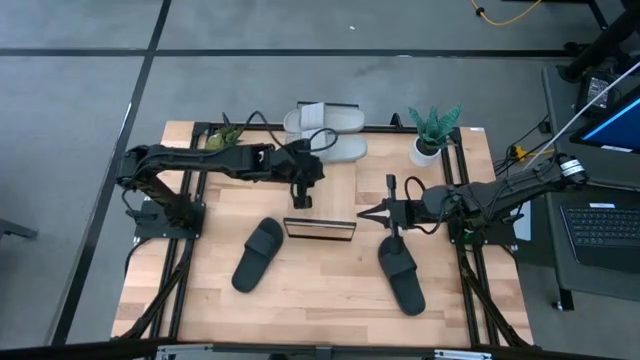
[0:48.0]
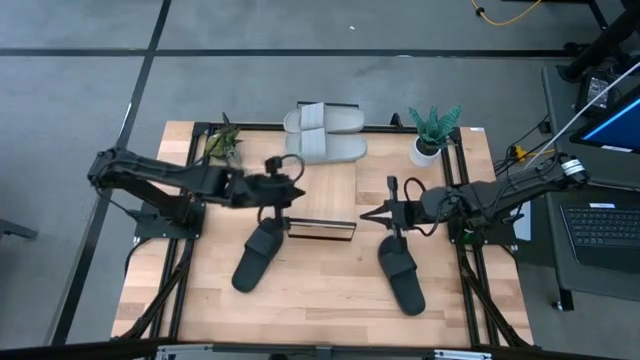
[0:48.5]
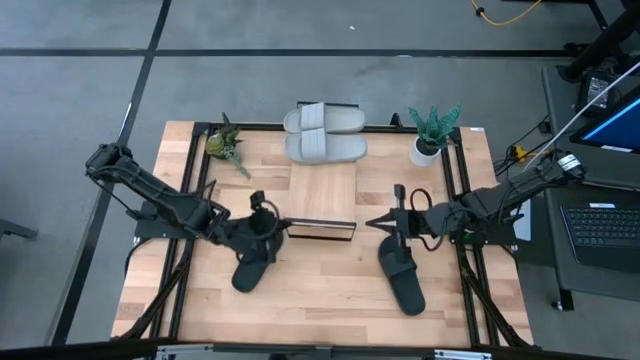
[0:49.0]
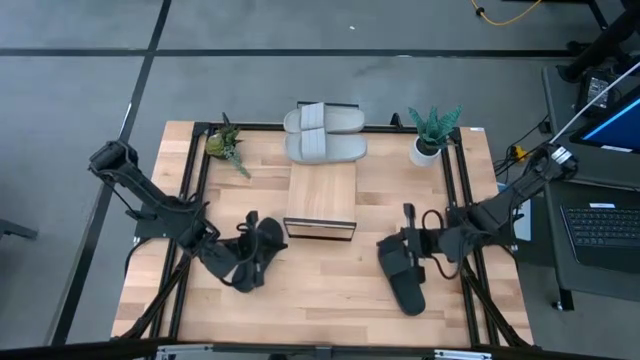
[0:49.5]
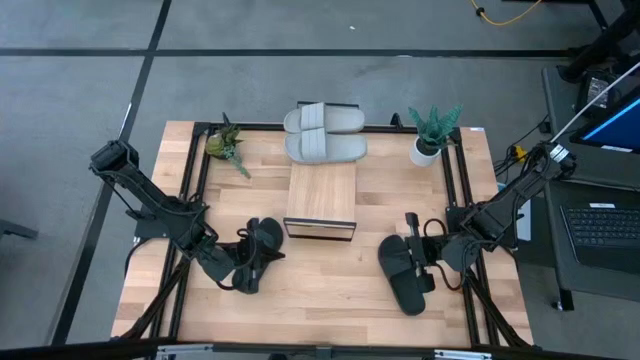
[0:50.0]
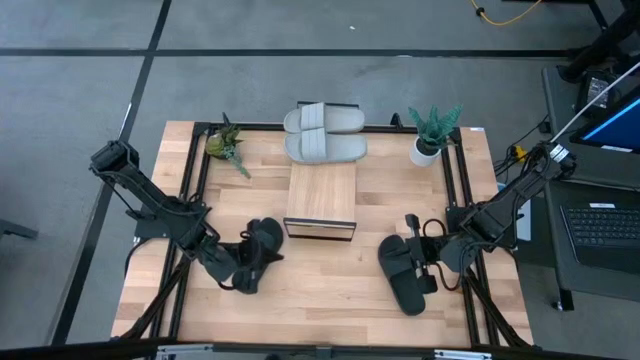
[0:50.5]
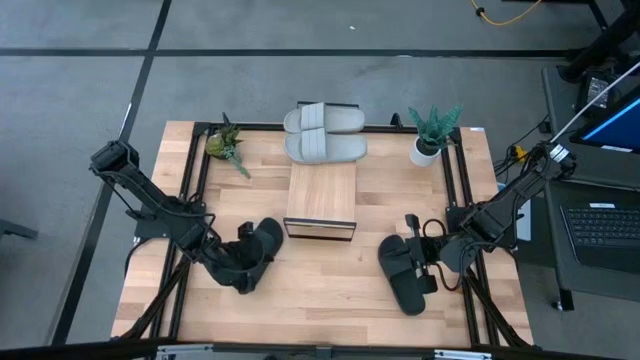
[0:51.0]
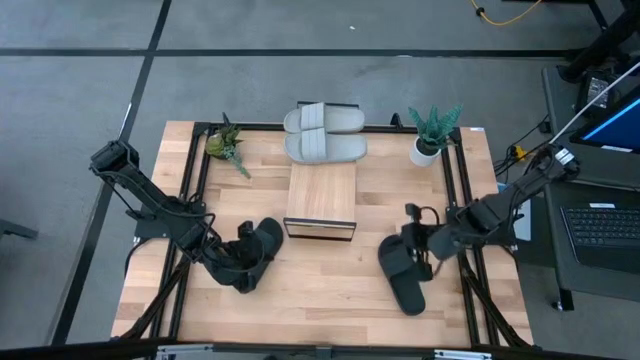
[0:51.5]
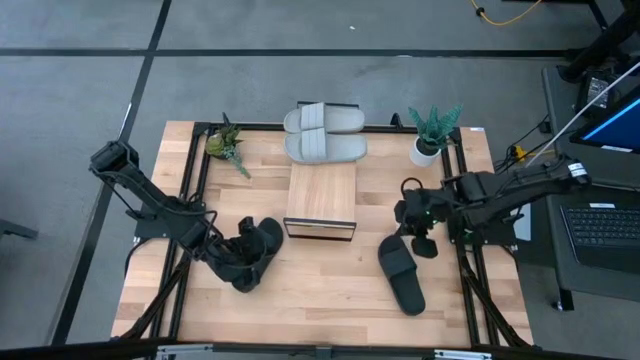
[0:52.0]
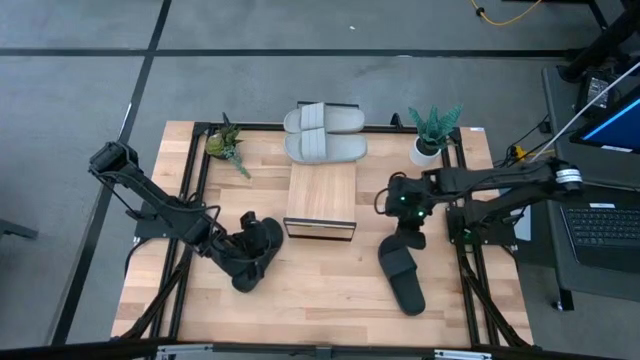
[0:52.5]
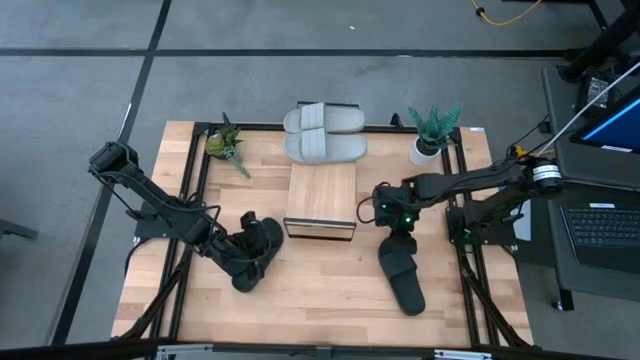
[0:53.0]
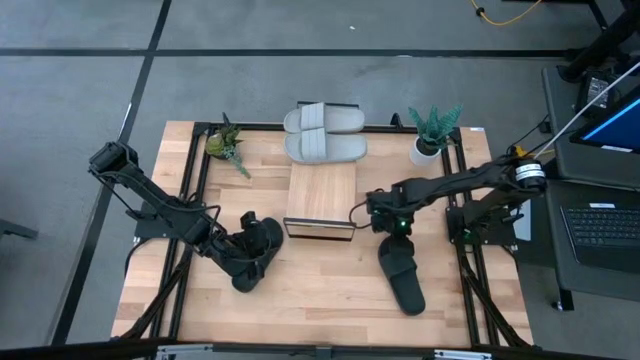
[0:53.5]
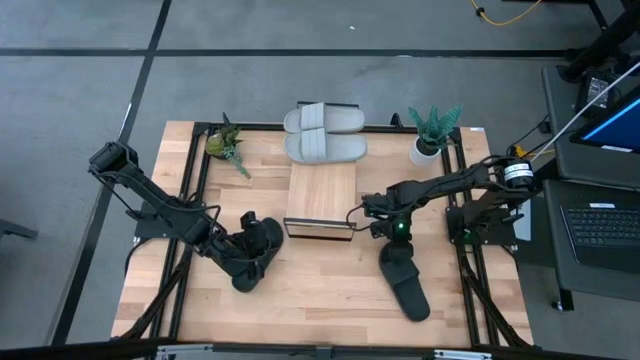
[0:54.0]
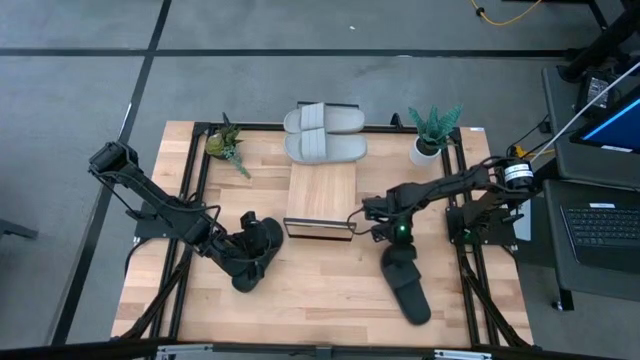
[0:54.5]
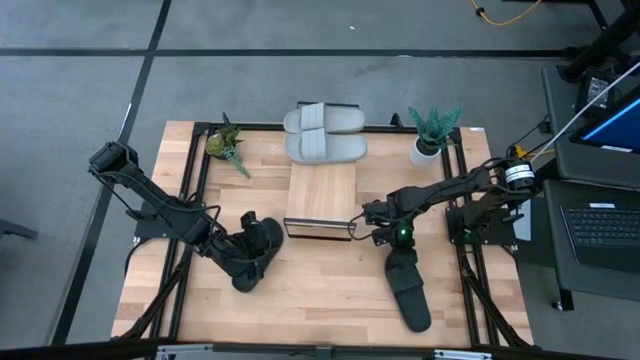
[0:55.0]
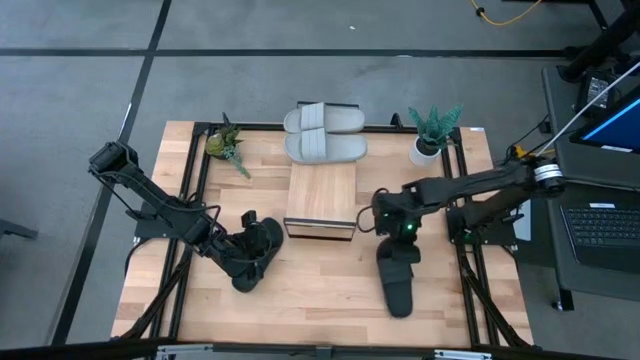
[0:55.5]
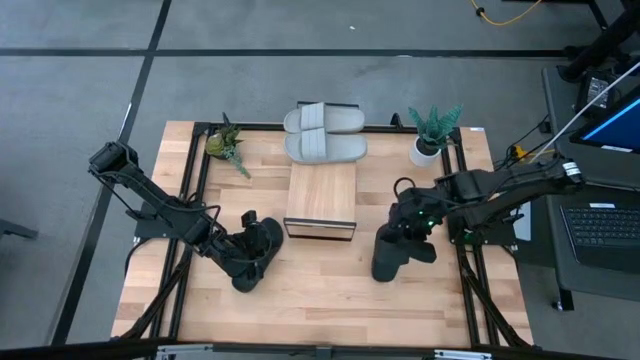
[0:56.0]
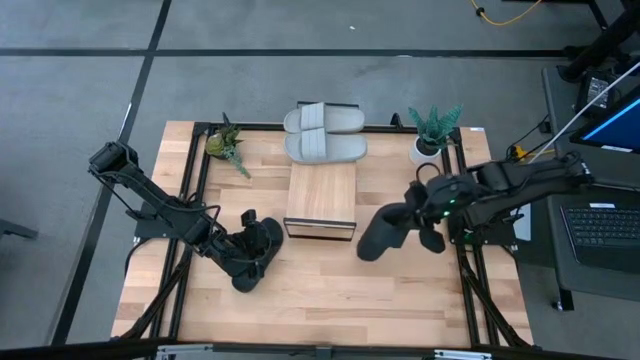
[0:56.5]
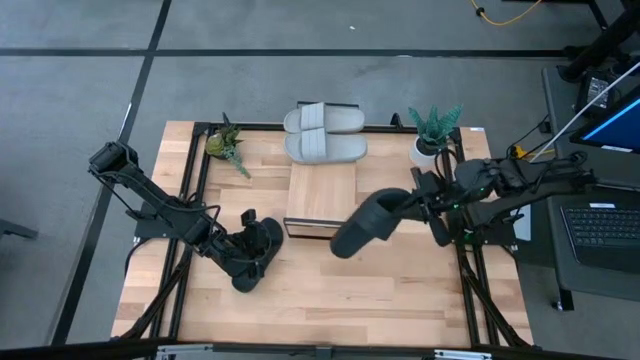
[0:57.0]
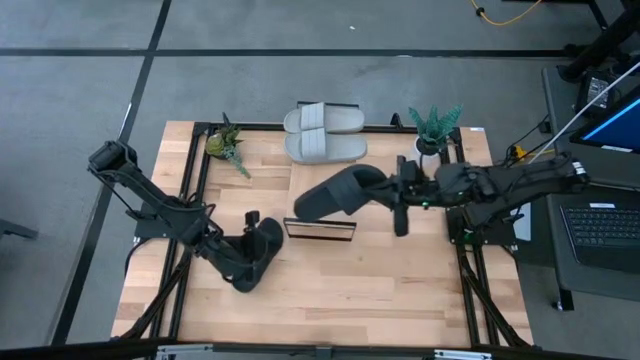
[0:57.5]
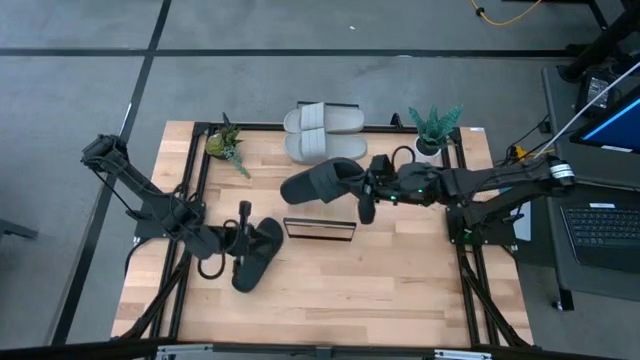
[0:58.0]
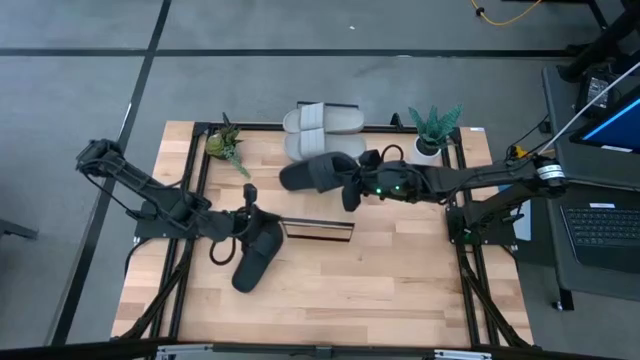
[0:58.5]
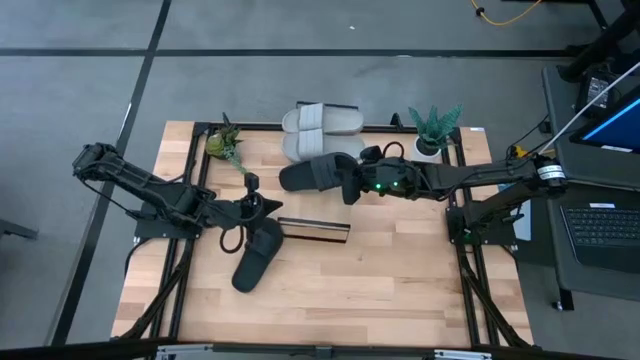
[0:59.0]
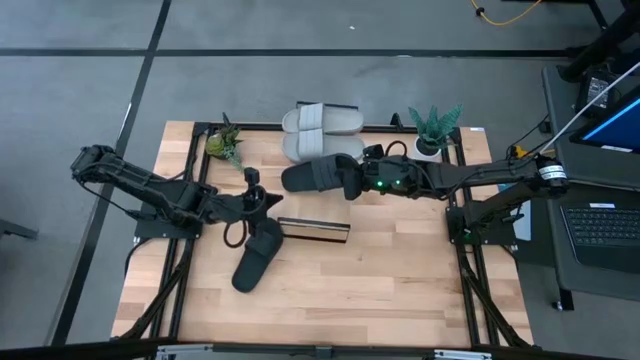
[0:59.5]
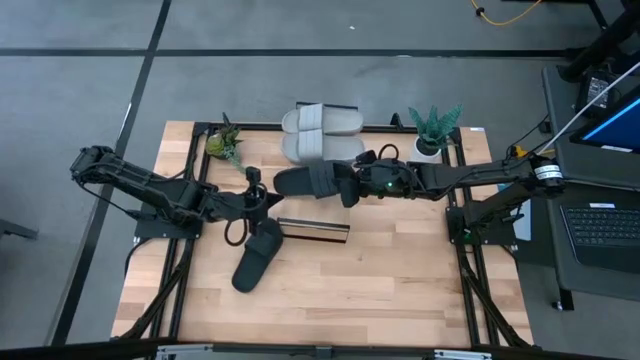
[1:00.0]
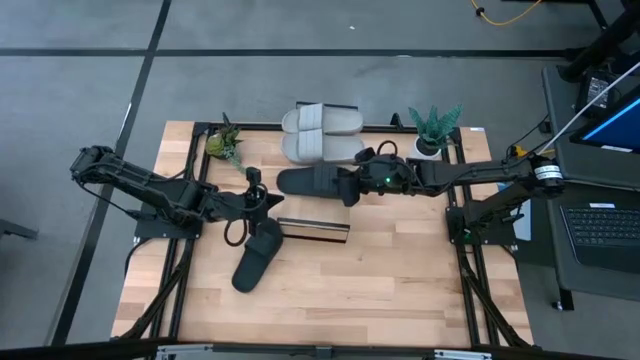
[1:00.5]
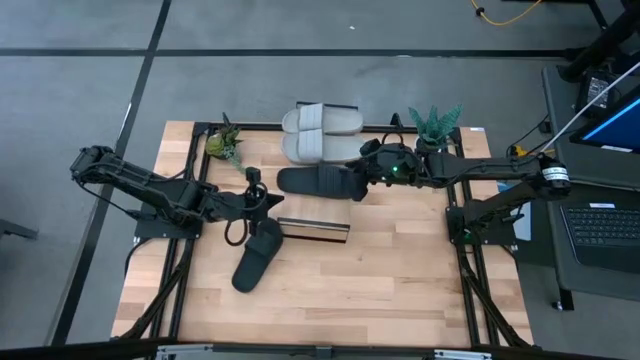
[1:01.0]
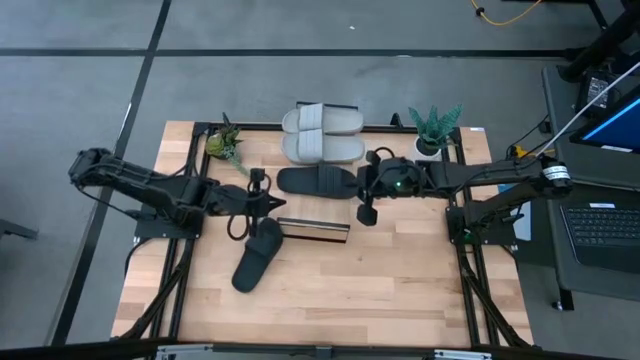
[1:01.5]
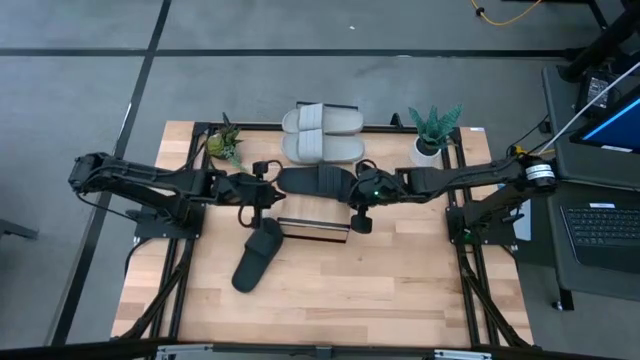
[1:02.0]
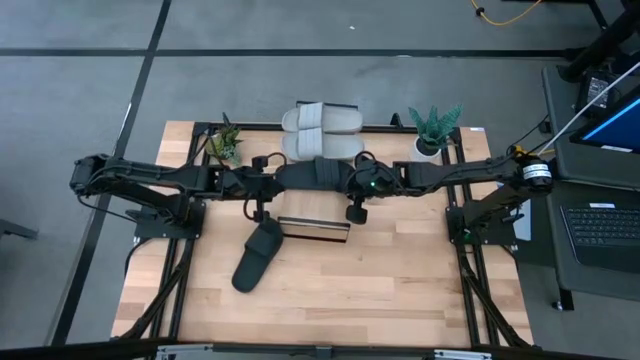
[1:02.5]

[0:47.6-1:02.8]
Task: Pick and place slides into the shelf
Put the right black slide on the shelf

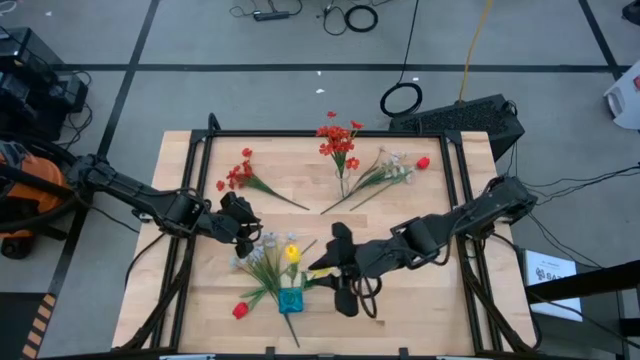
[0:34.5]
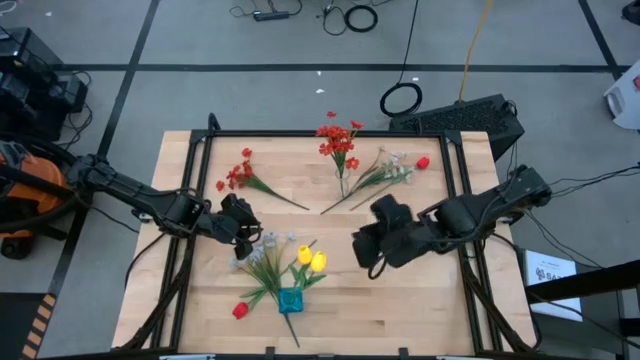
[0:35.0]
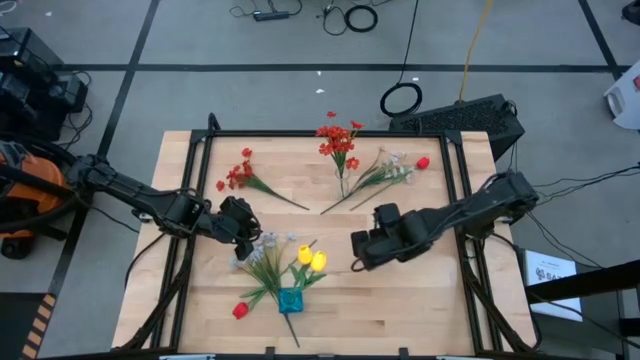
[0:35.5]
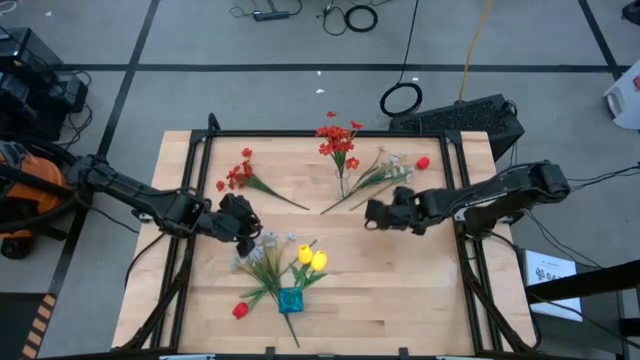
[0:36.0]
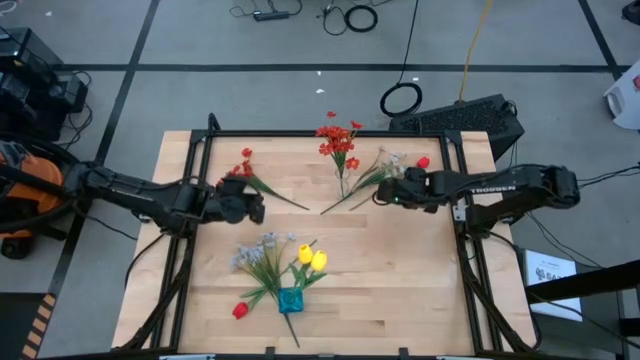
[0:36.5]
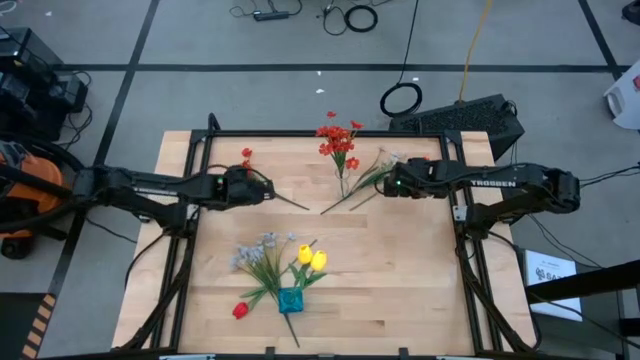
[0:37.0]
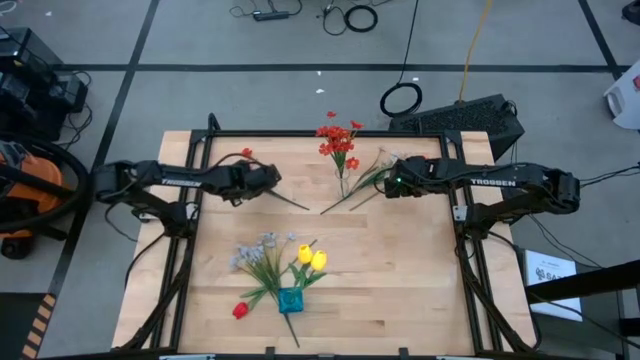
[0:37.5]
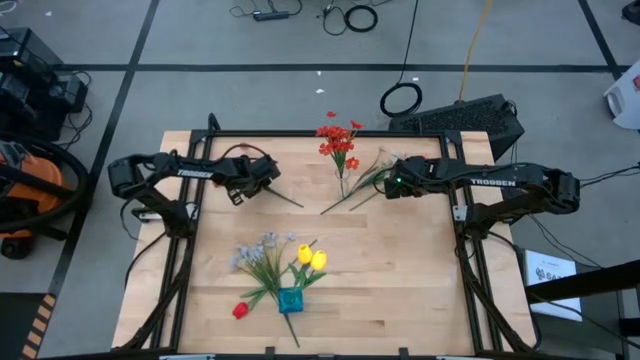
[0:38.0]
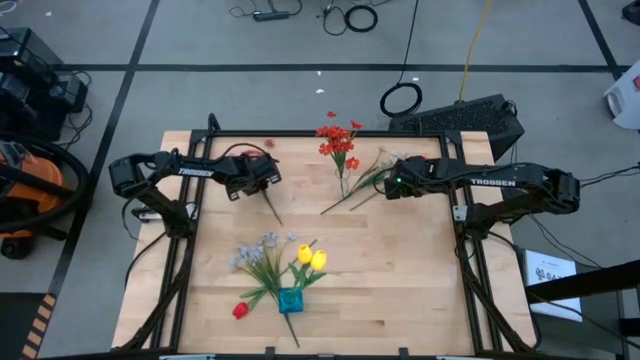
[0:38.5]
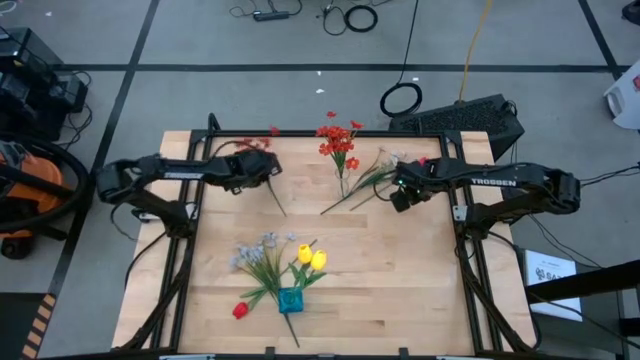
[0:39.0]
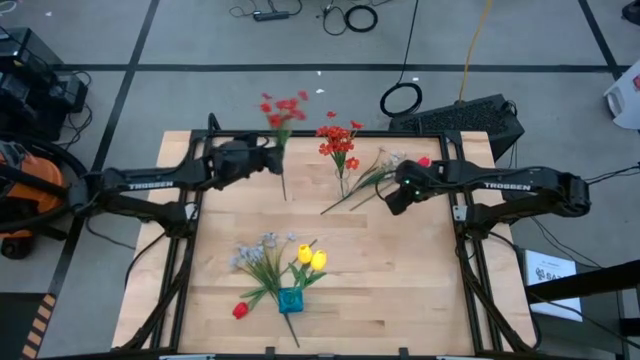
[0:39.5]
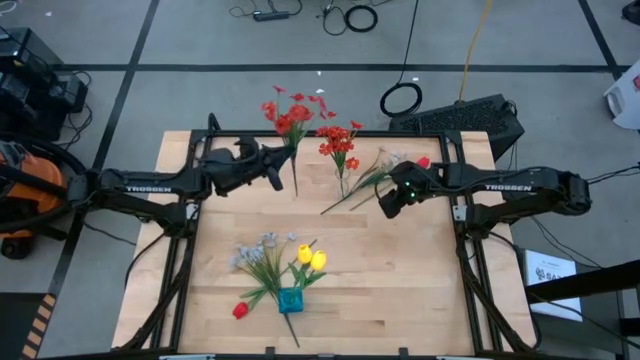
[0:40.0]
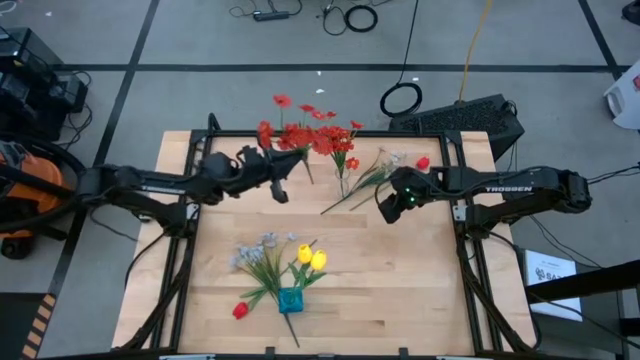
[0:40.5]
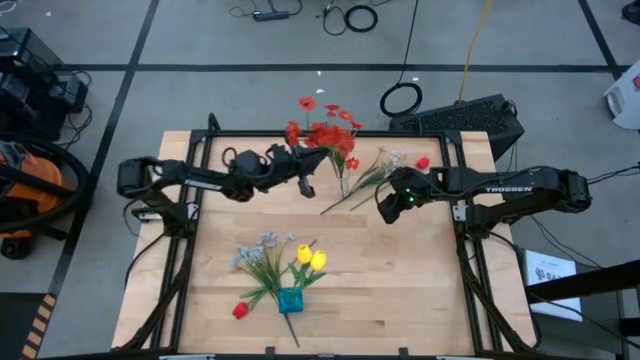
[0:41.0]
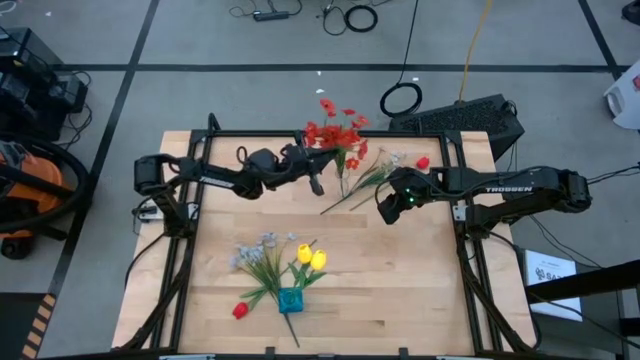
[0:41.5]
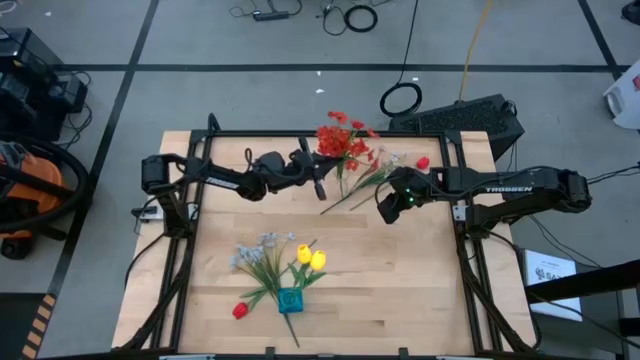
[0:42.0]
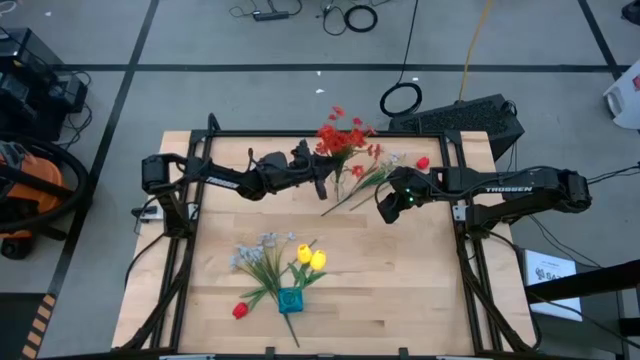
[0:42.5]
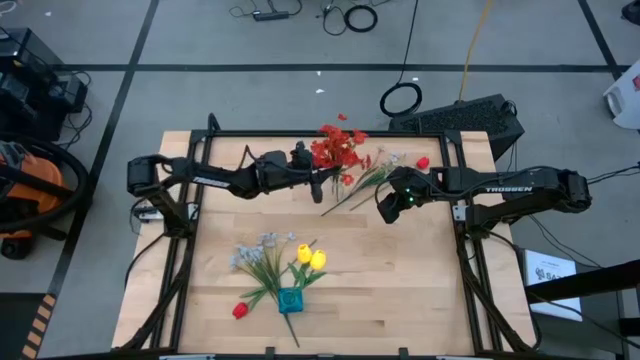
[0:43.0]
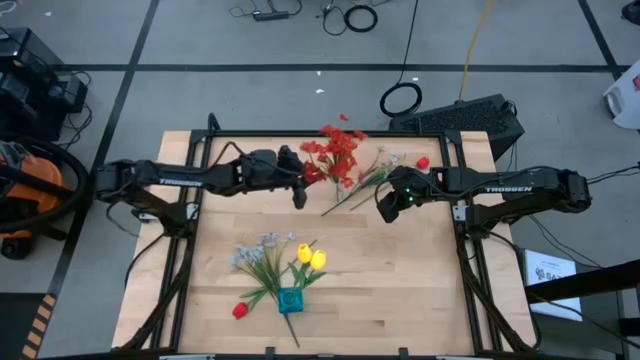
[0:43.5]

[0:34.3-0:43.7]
Task: Sort flowers into vase by color
Put the red flowers into the transparent flower vase
